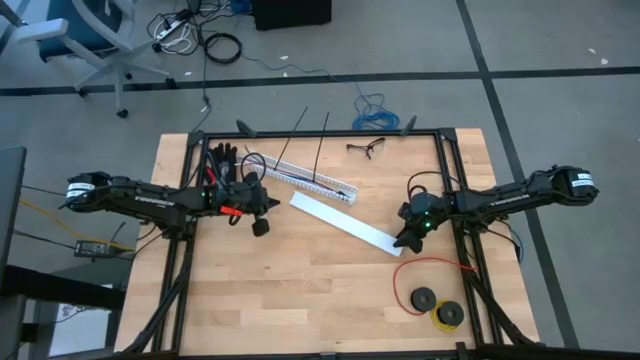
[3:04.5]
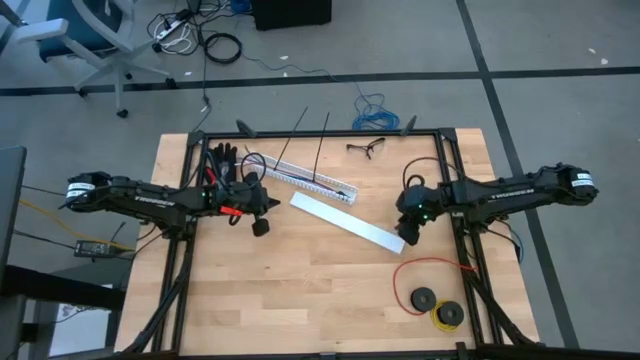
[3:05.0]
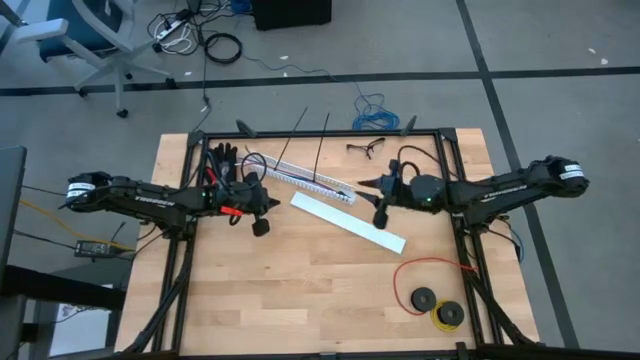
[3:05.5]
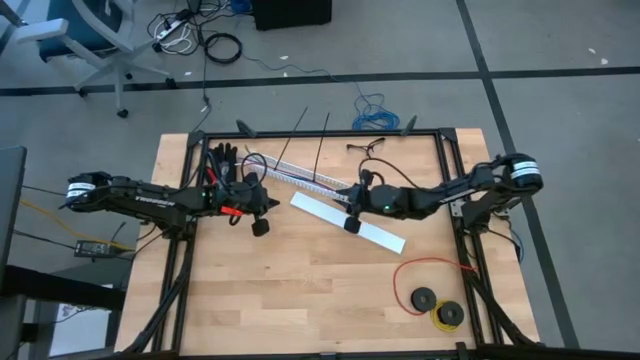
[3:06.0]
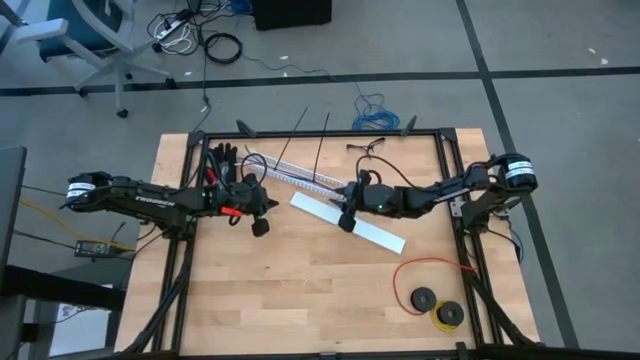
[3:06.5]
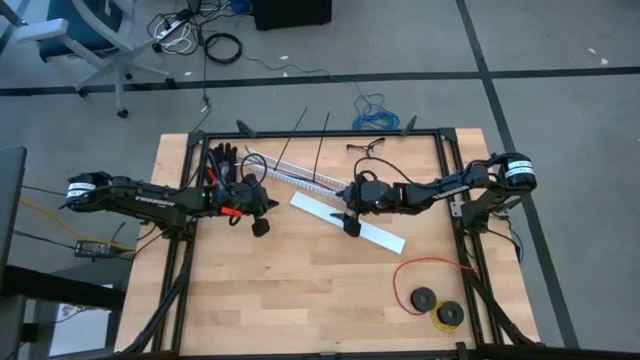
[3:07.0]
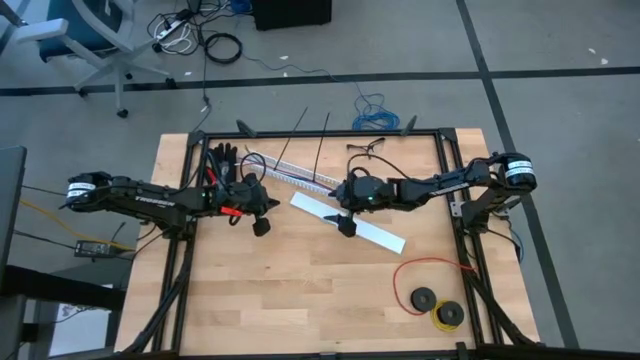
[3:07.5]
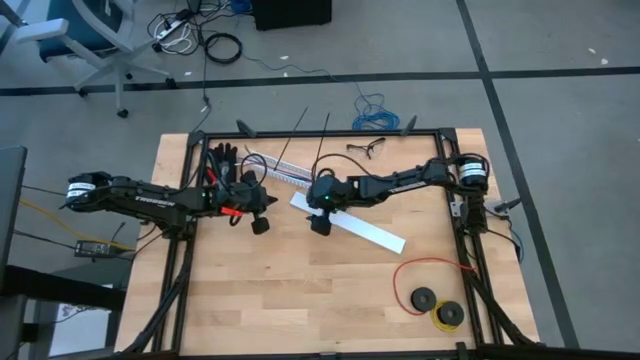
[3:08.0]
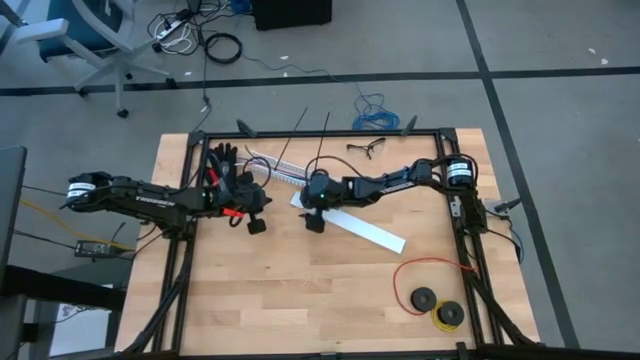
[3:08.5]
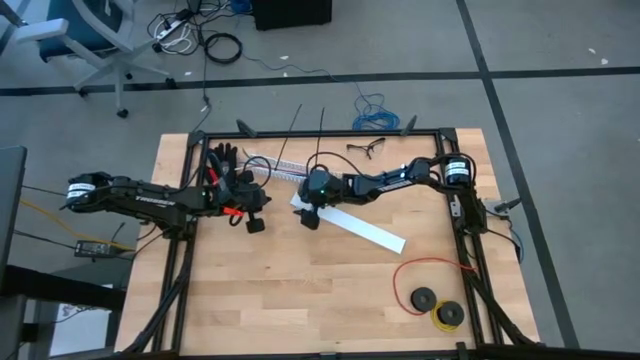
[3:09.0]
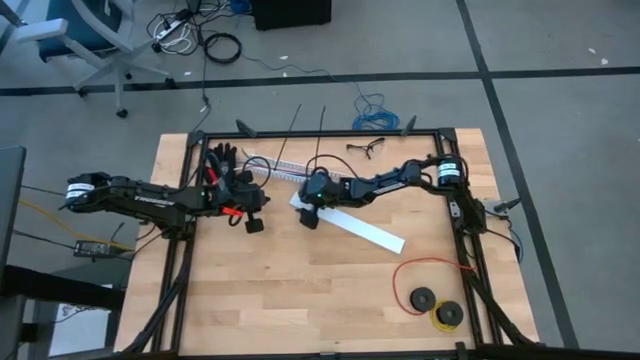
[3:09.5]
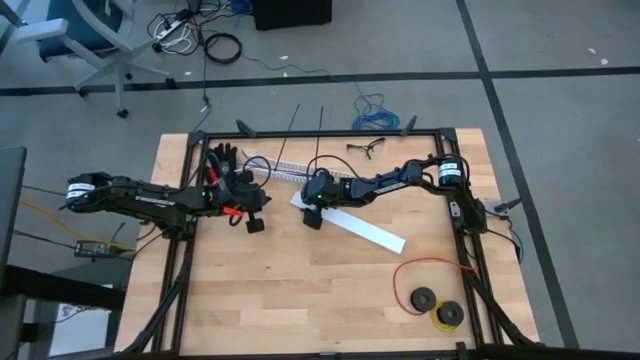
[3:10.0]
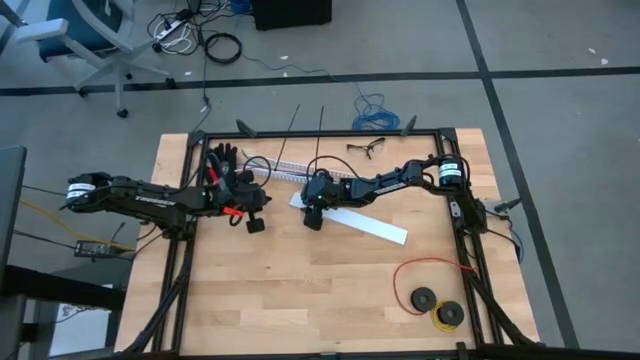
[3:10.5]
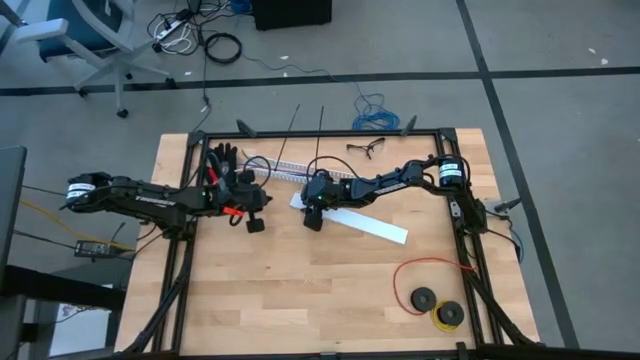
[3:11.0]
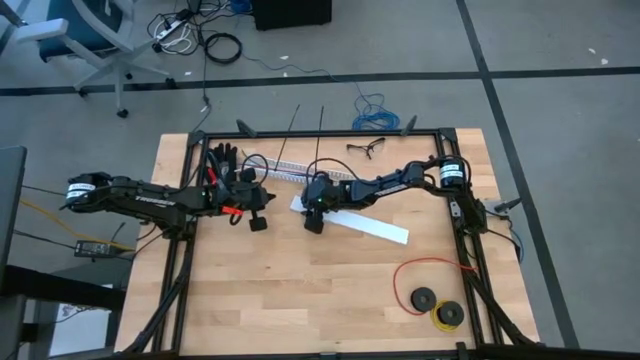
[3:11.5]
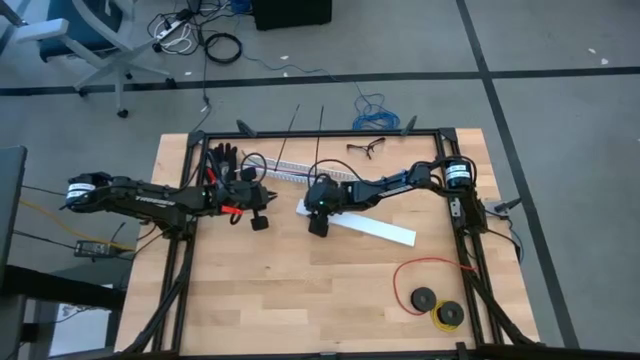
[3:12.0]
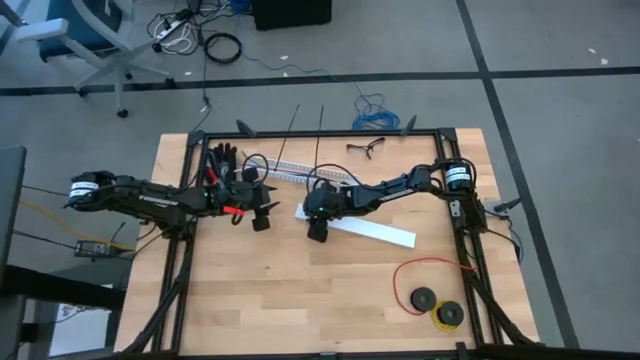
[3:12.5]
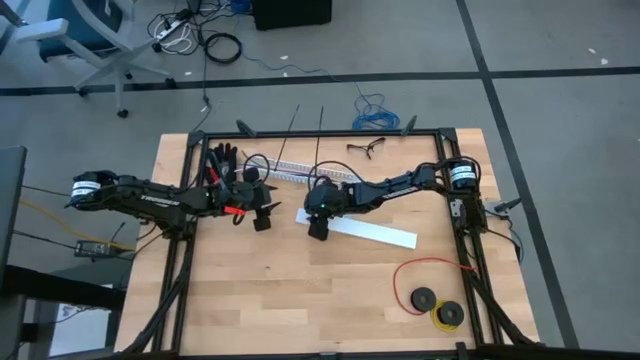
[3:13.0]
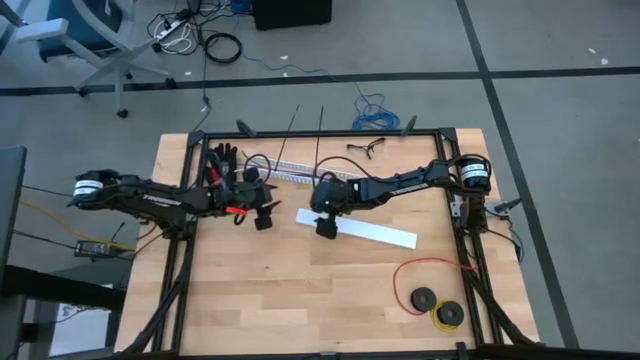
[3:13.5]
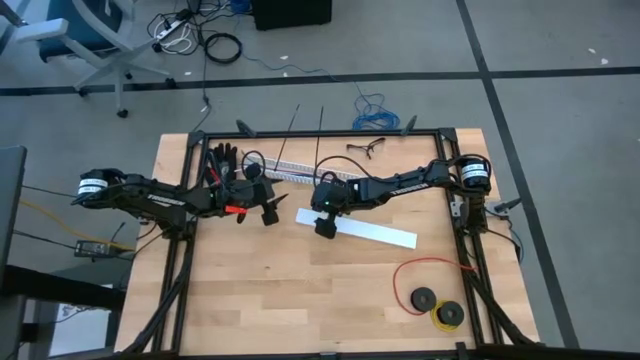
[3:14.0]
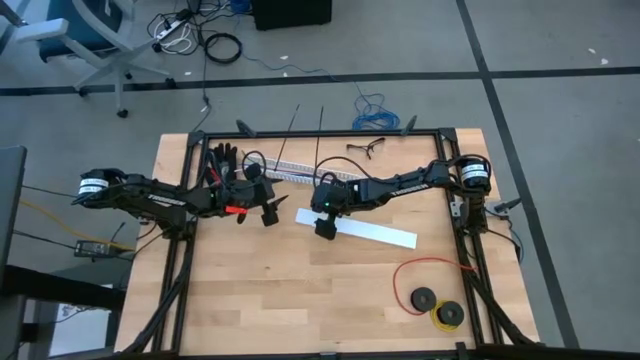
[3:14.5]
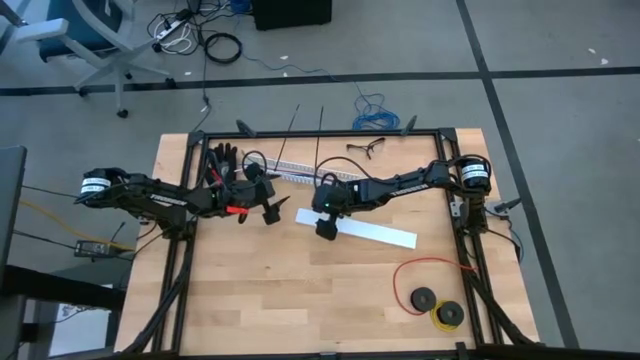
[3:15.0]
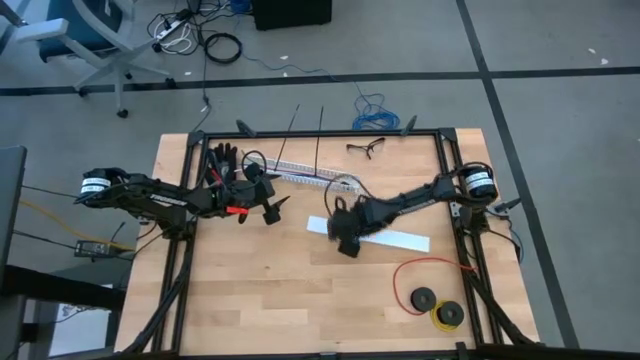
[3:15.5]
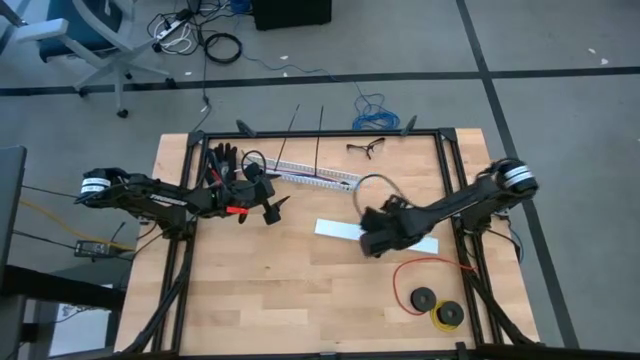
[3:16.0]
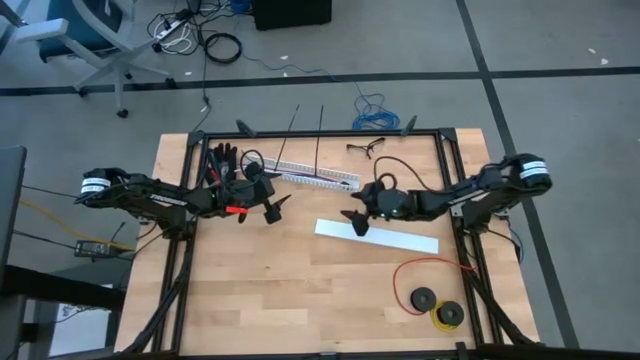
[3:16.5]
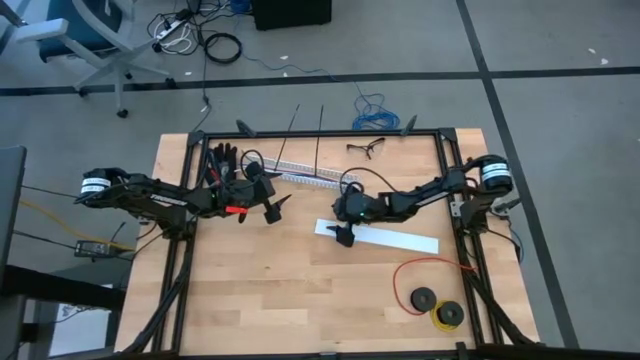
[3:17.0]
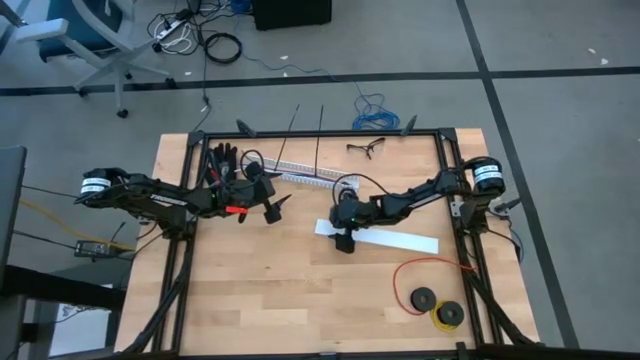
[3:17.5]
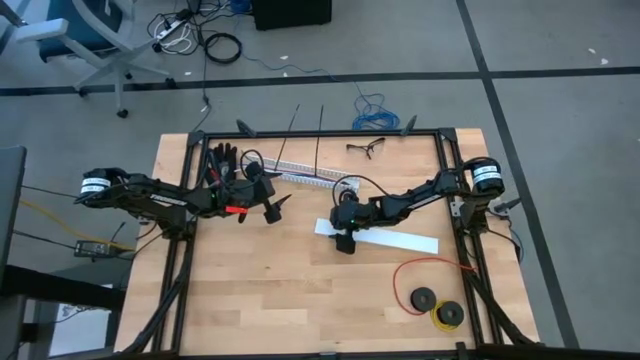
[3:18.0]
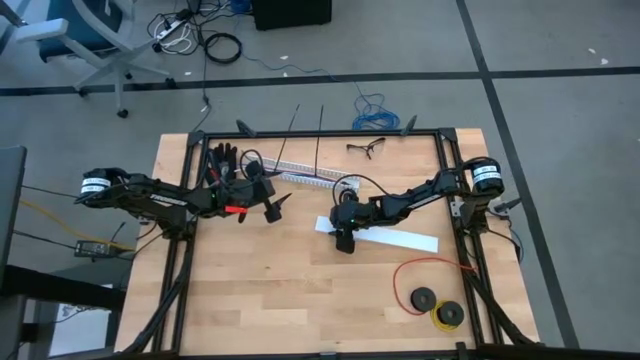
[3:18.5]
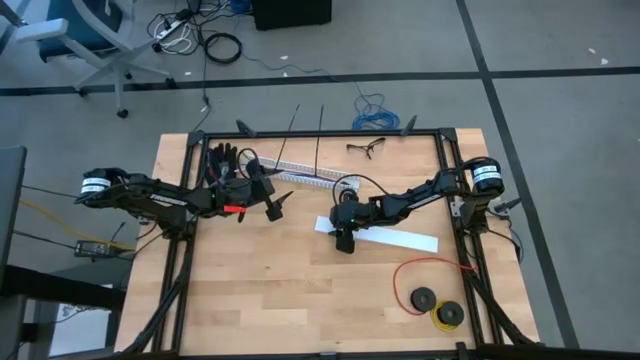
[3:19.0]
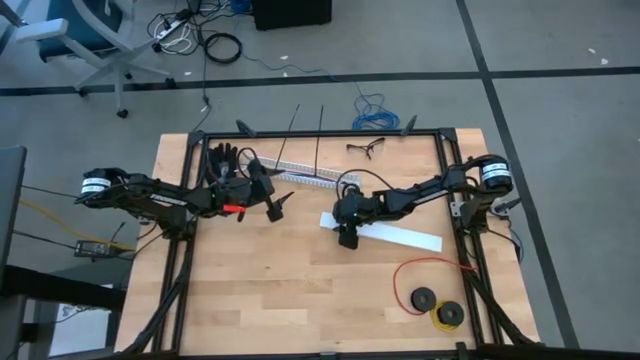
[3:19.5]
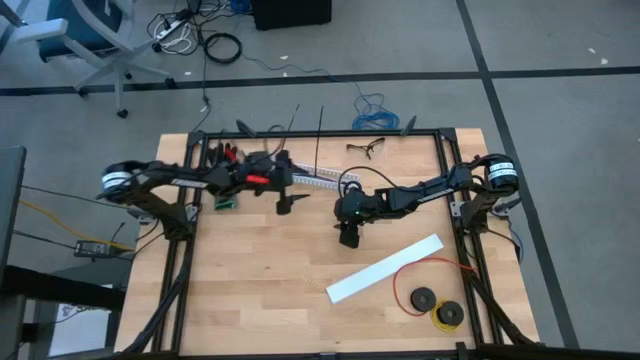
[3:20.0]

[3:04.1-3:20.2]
Task: Ziptie cables
Close the white cable duct

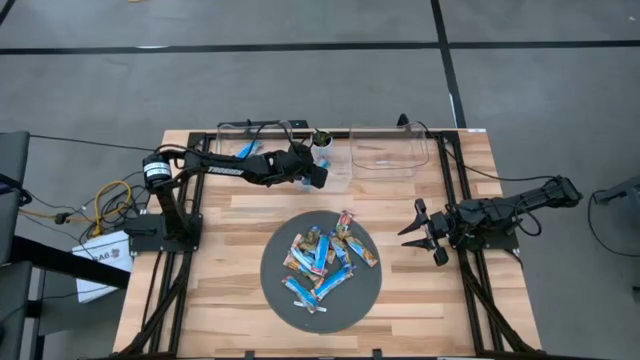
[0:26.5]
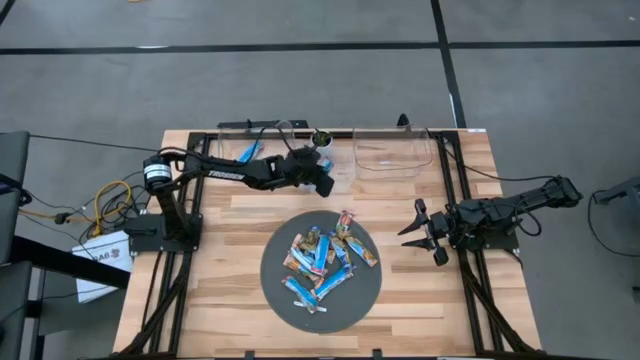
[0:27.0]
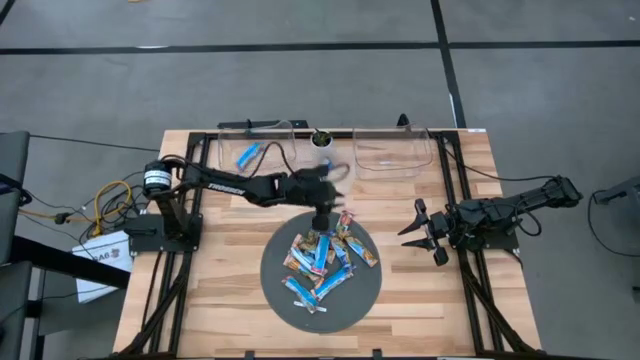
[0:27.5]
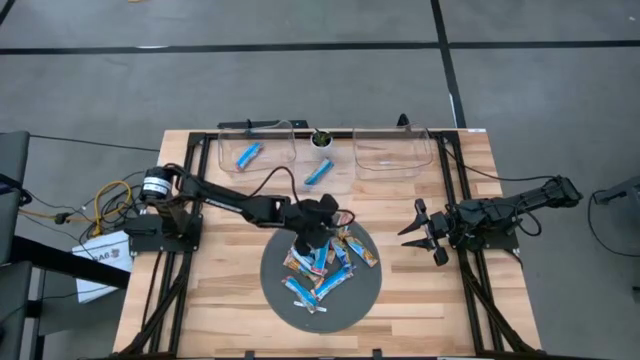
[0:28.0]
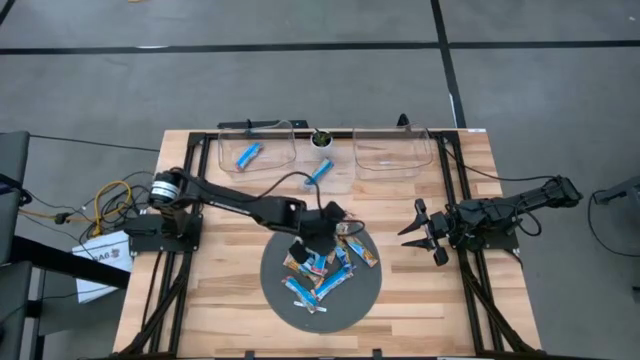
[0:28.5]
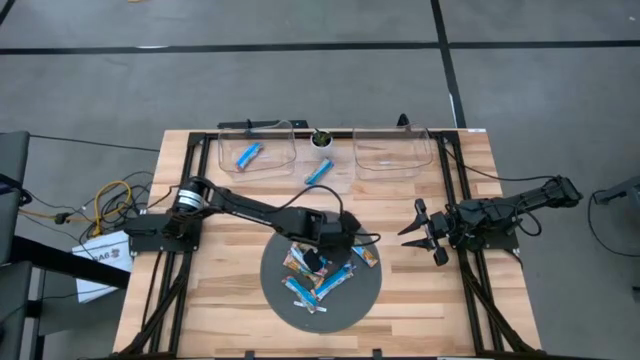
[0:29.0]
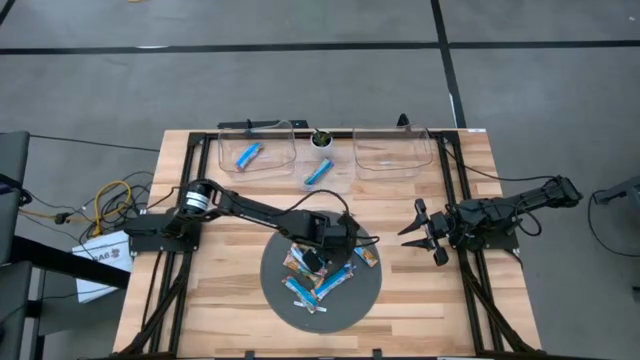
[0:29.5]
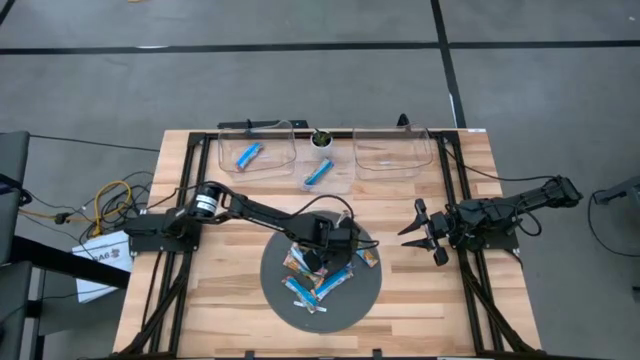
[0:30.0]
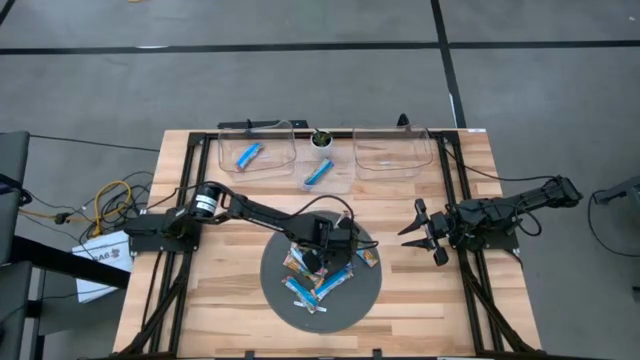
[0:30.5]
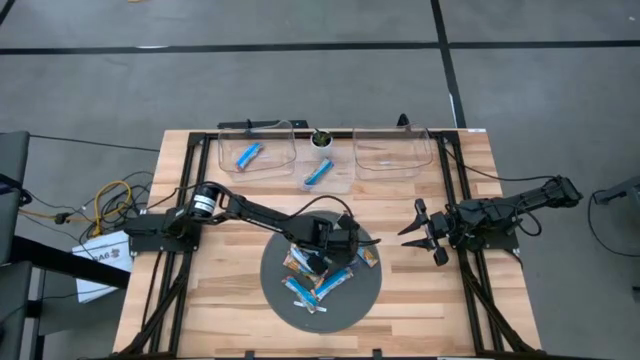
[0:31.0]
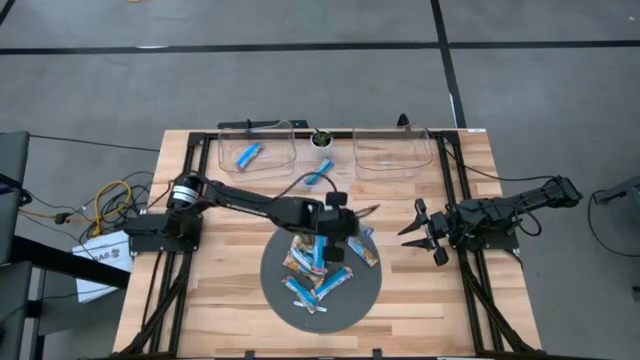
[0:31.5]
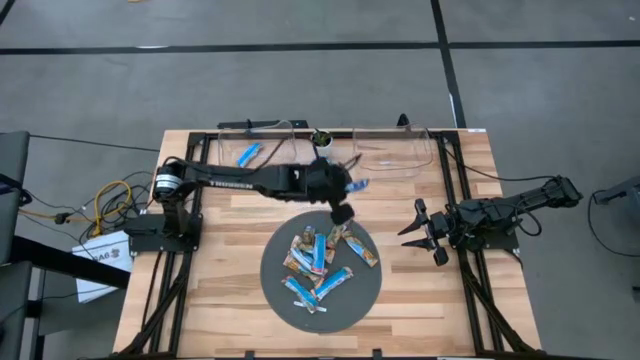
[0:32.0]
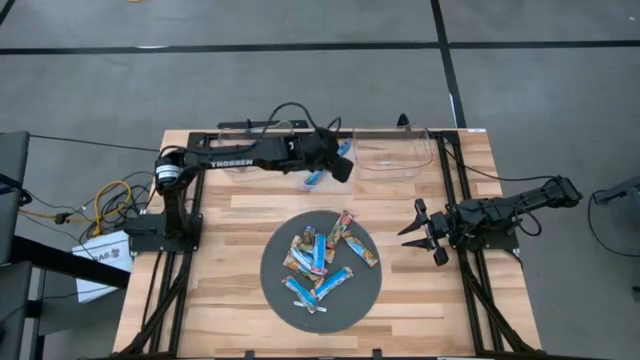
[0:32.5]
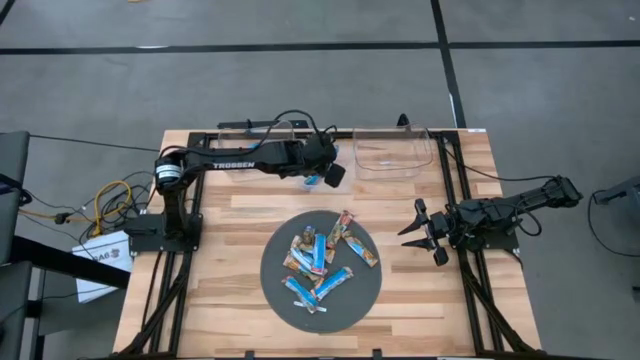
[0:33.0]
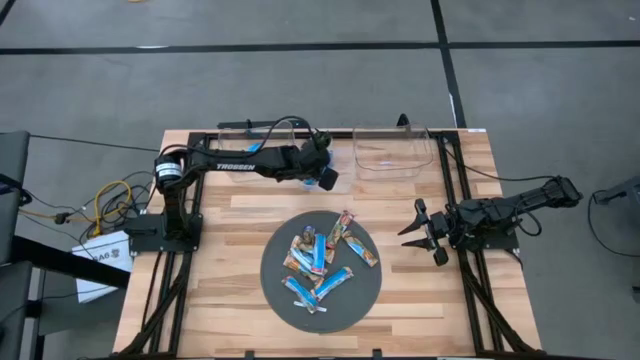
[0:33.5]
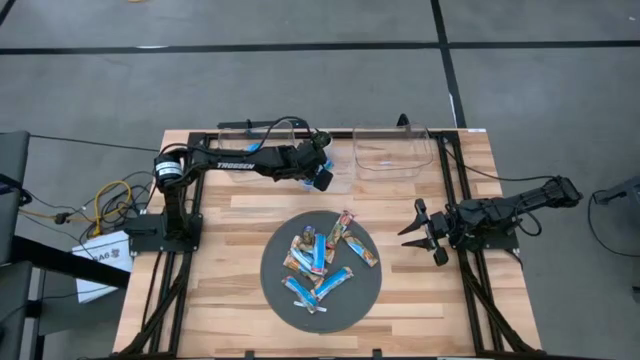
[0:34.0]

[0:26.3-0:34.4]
Task: Pick and place Granola Bars by type
Put the blue granola bar into the white bin
